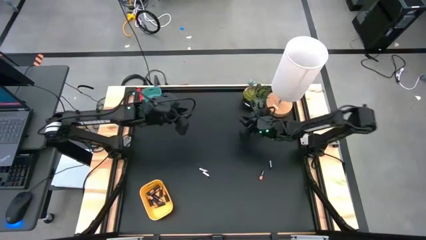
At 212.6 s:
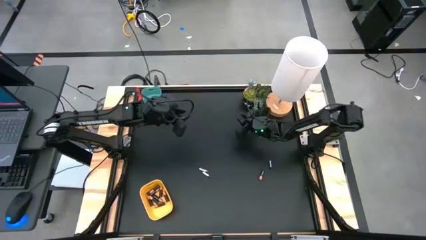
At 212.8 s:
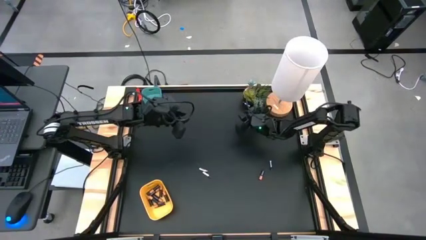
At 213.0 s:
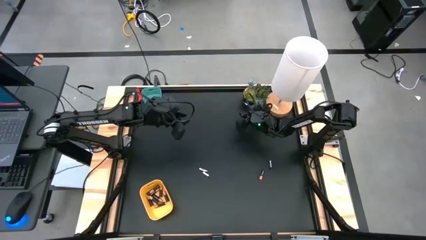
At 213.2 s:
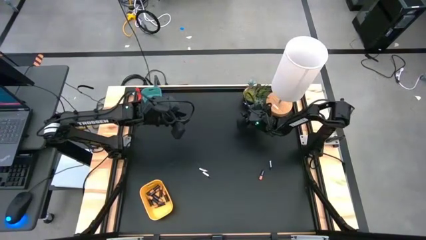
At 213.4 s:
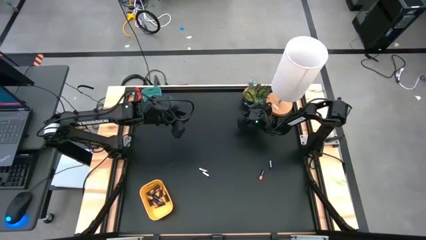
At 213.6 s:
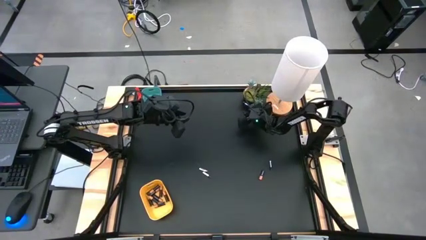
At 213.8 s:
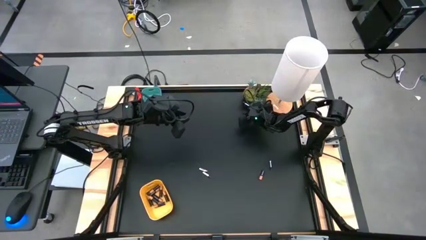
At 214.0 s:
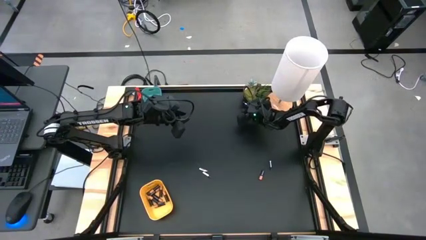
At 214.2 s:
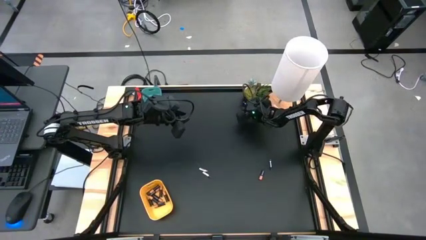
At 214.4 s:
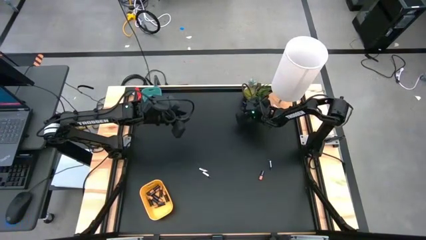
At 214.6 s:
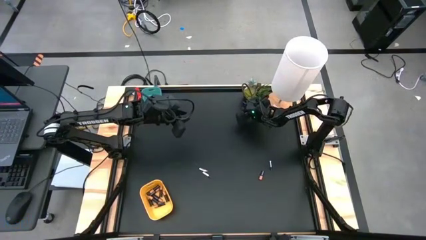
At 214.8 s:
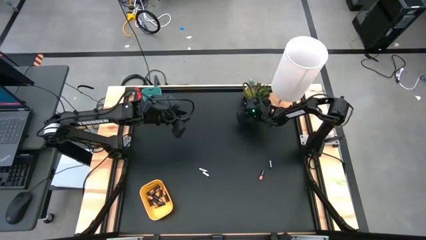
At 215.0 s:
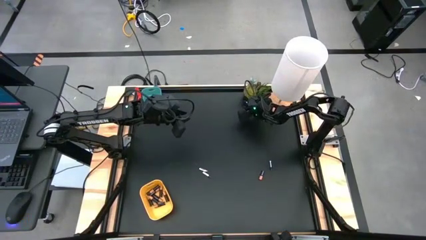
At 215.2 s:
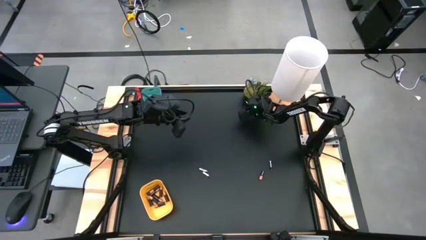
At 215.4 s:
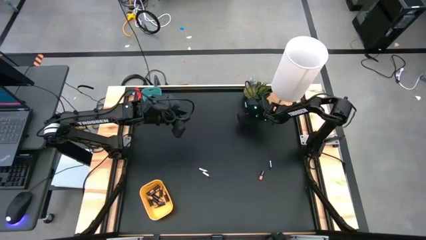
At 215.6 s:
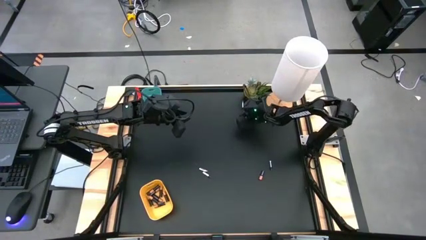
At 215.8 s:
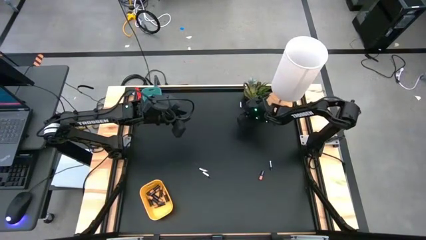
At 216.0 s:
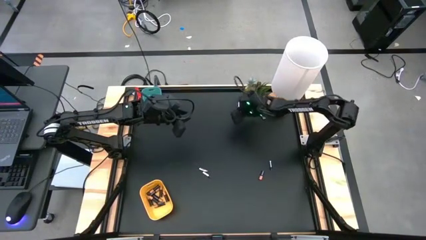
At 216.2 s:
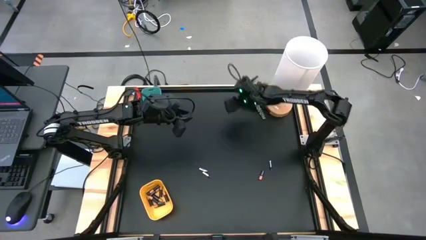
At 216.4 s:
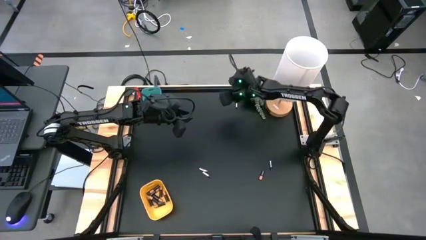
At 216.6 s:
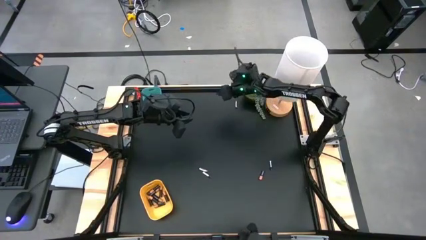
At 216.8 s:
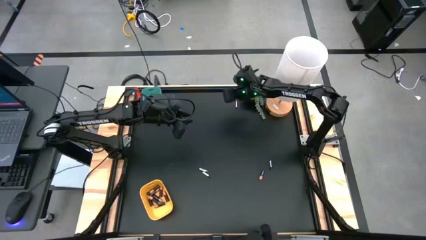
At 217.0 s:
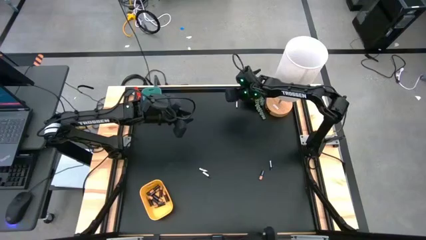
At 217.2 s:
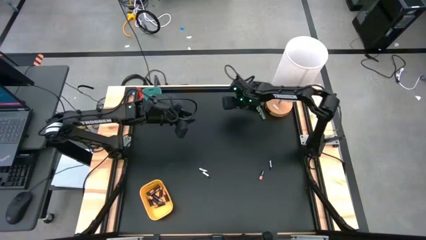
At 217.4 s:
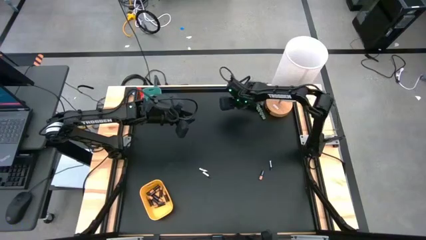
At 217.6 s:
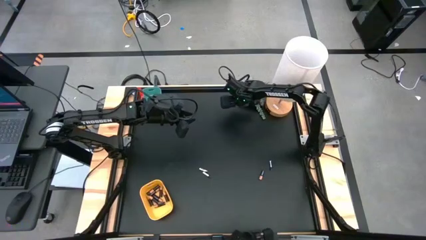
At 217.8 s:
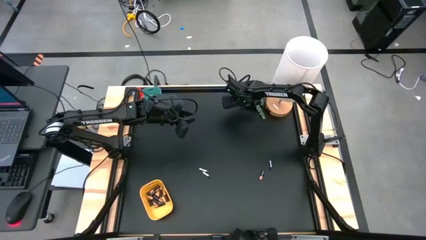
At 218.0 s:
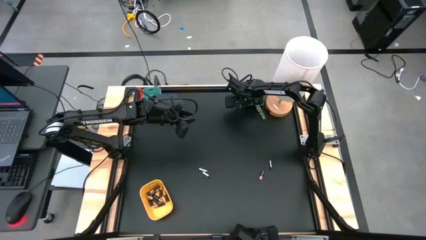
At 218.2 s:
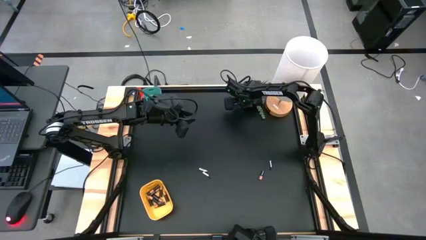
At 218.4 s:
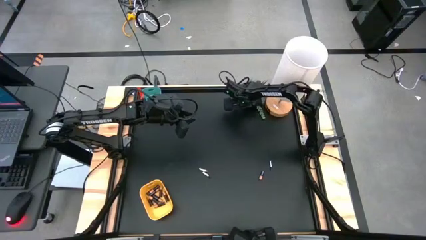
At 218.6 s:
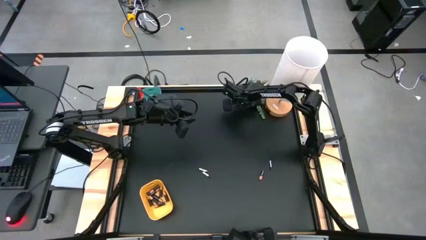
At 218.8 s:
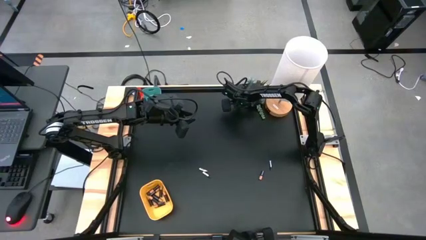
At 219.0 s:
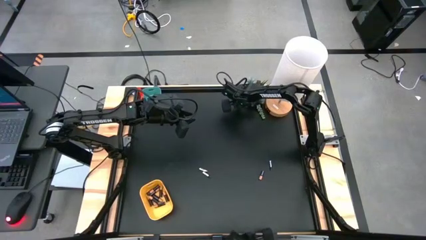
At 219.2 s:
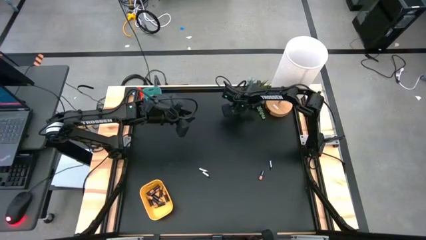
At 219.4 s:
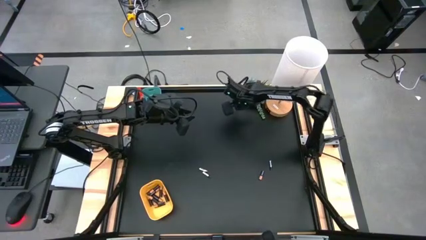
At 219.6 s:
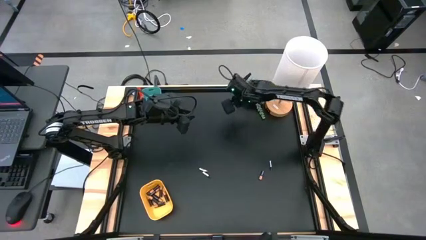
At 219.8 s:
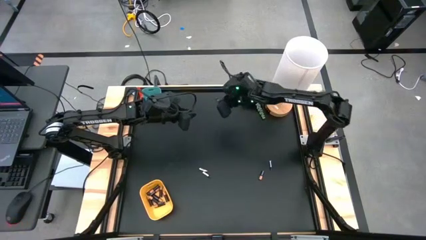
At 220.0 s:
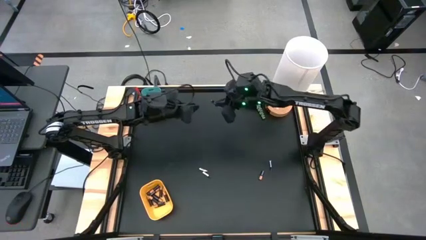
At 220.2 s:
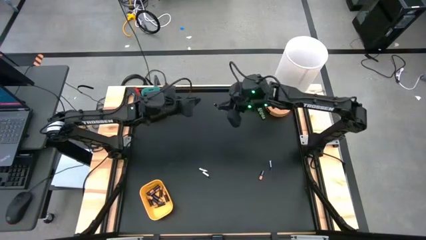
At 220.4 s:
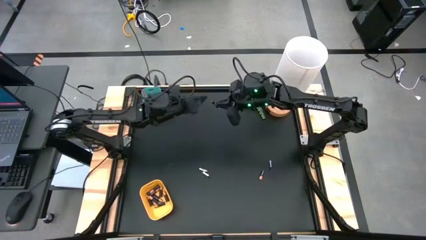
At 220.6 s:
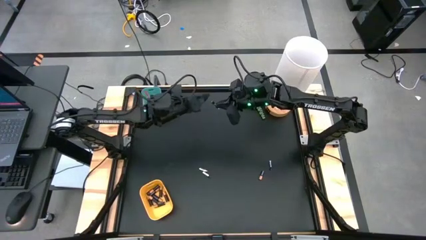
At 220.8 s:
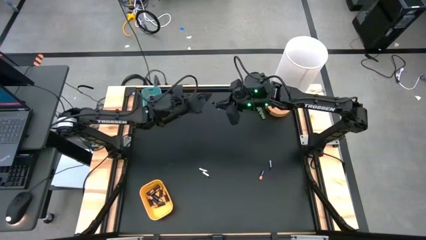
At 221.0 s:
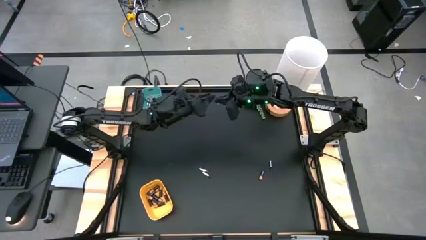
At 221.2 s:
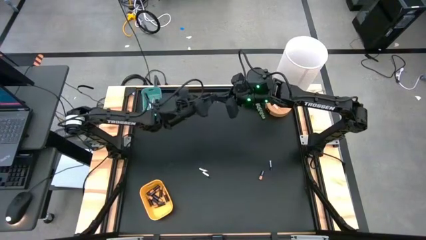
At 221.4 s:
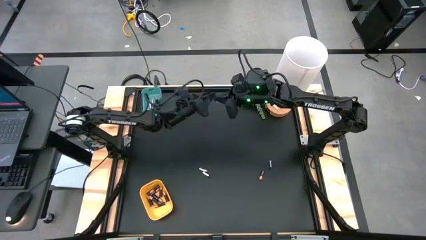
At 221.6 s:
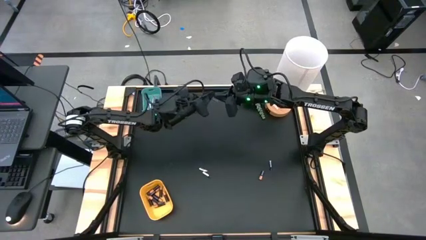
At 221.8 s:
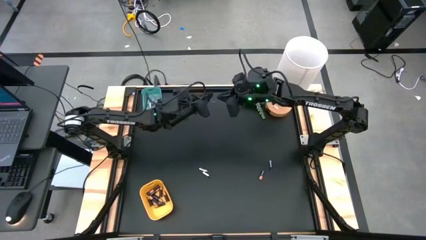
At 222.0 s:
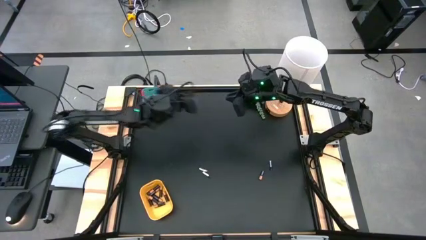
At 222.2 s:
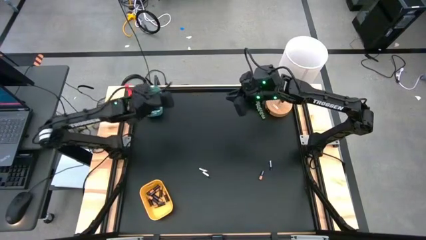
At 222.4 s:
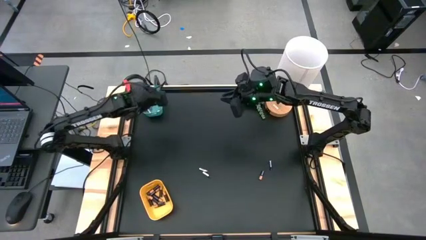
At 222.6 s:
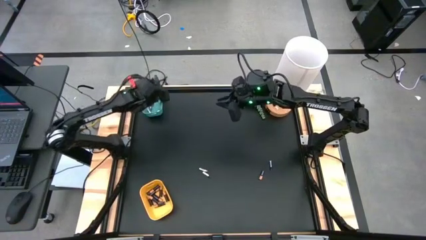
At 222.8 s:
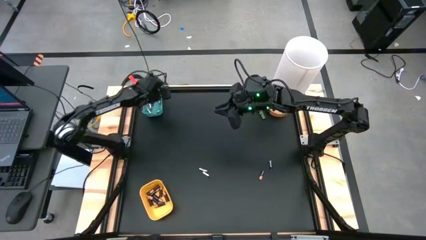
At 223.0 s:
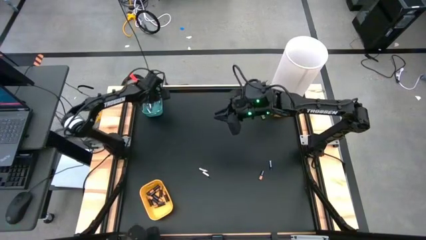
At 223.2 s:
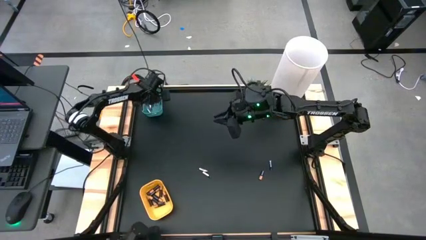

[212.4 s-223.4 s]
Task: Sort batteries
Put the silver battery into the blue bin

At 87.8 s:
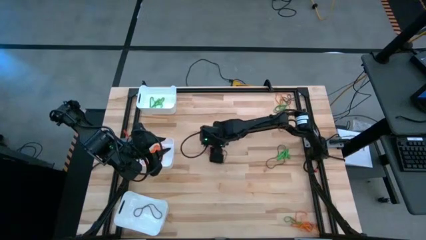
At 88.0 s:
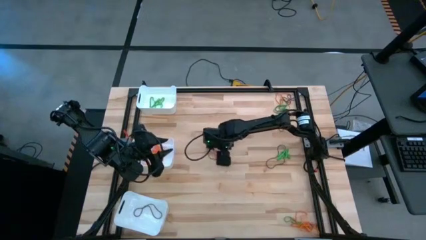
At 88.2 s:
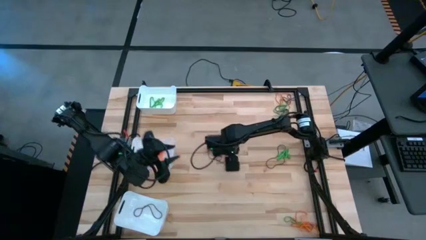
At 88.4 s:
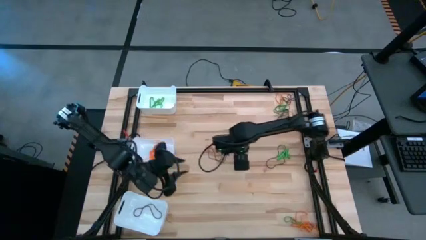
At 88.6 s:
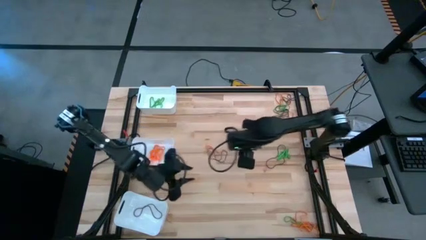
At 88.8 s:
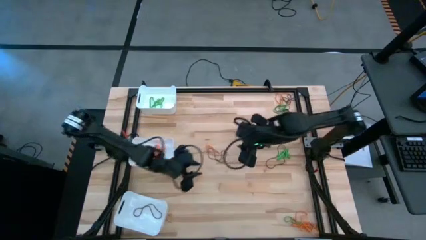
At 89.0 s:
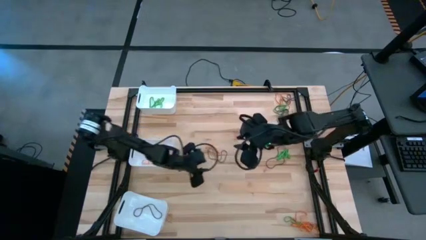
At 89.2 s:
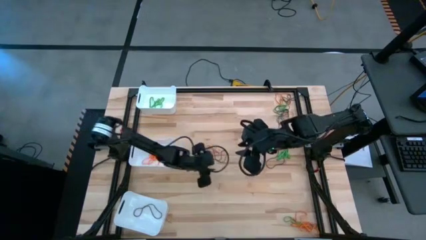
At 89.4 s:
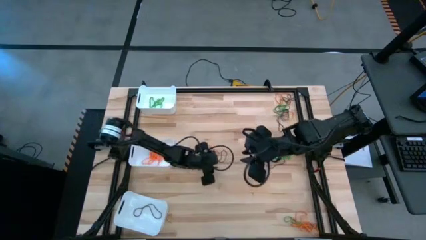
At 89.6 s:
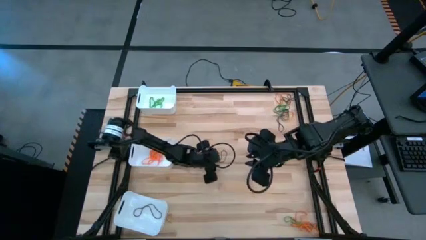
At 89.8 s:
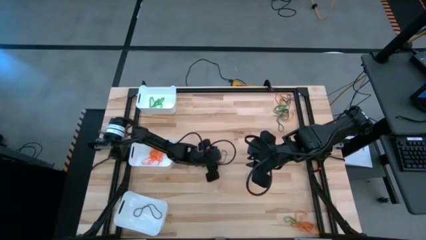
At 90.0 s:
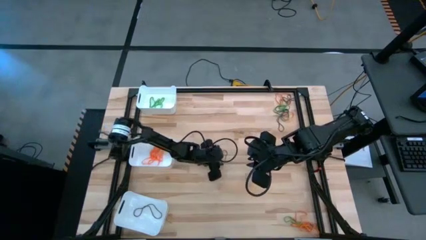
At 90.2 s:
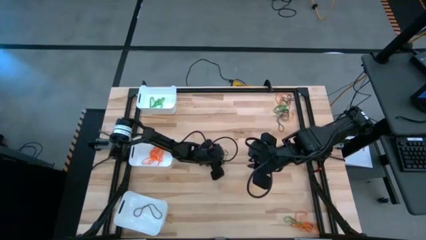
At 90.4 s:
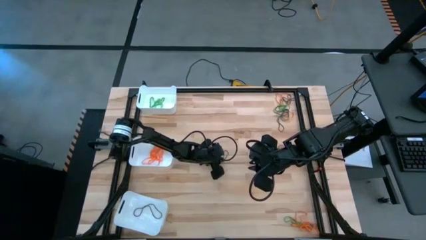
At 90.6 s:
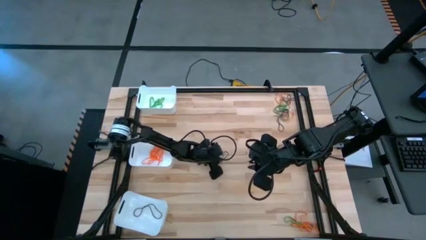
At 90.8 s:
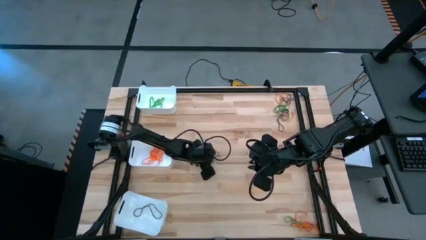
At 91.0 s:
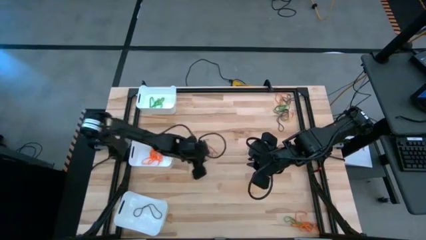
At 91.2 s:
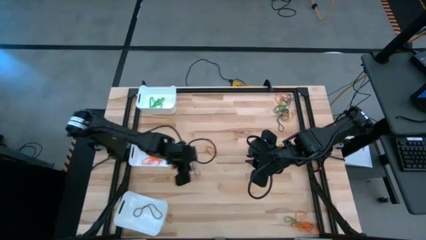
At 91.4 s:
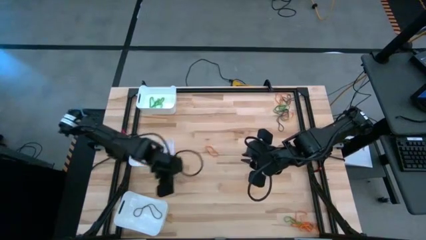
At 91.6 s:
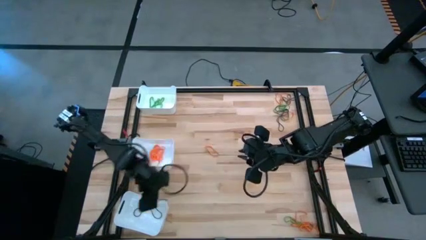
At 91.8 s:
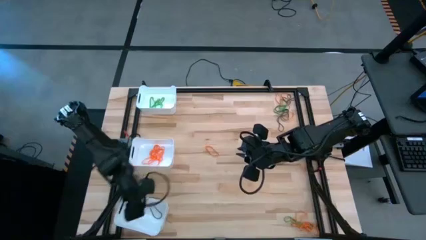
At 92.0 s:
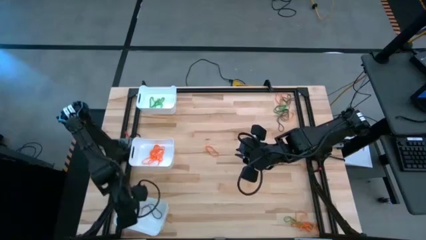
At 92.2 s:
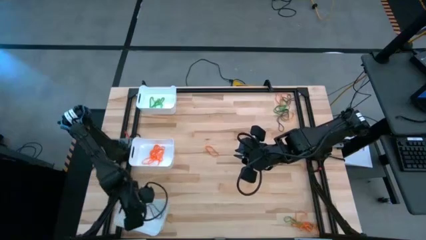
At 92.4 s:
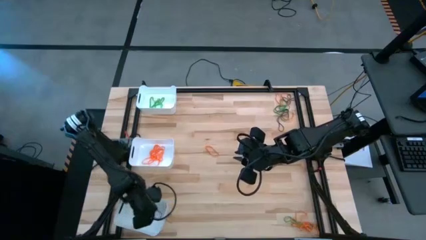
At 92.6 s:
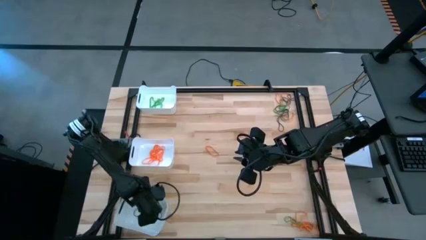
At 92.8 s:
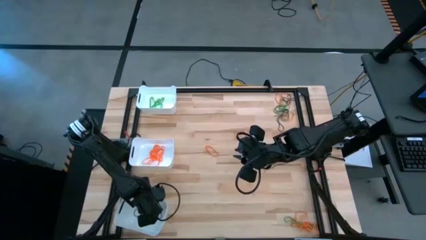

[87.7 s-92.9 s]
Task: Sort rubber bands into baskets
Put the black rubber band into bottom white bin
